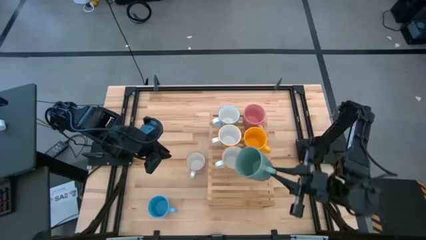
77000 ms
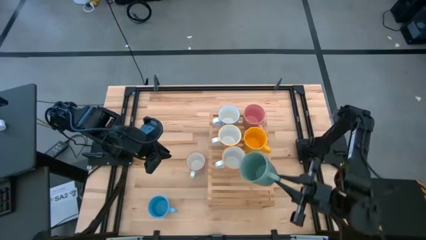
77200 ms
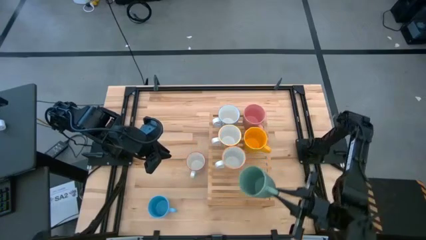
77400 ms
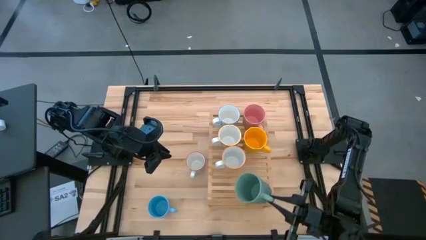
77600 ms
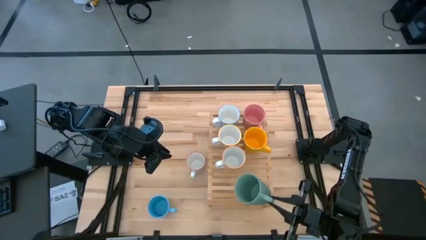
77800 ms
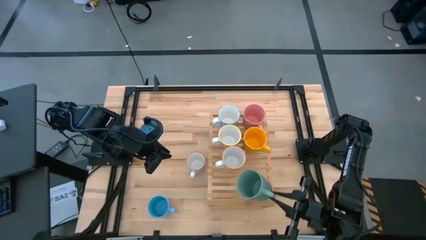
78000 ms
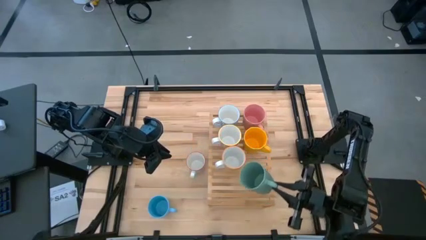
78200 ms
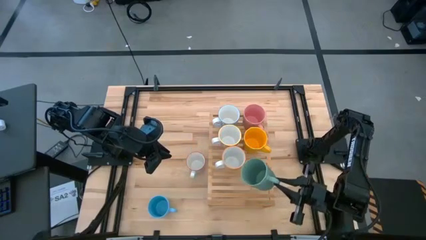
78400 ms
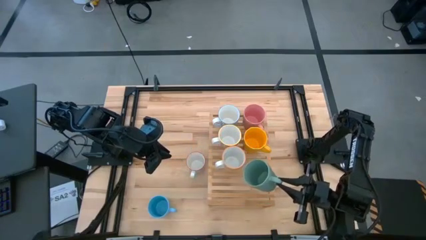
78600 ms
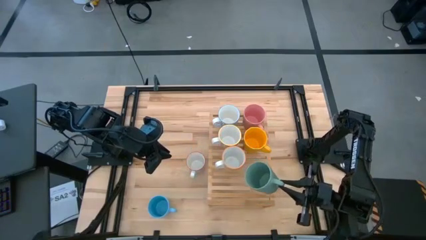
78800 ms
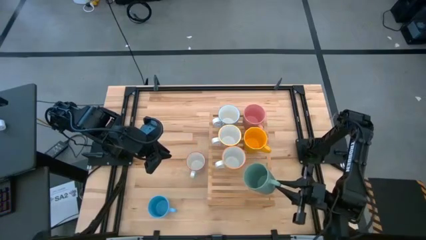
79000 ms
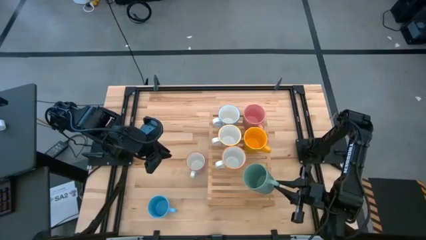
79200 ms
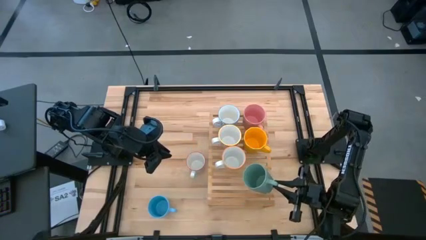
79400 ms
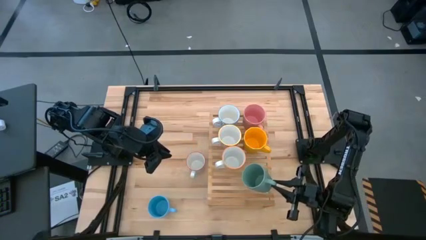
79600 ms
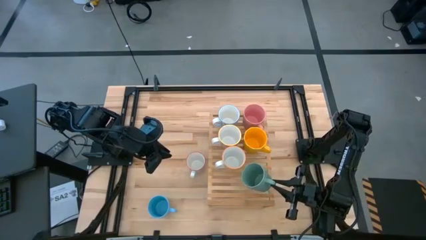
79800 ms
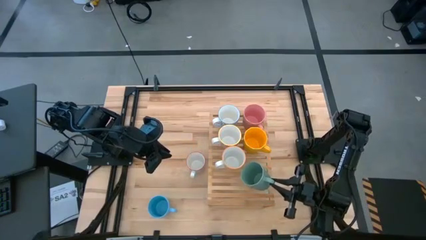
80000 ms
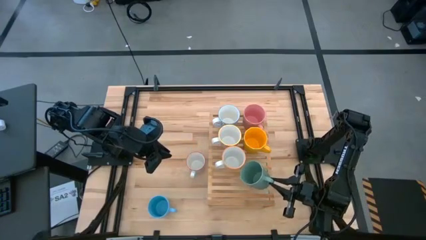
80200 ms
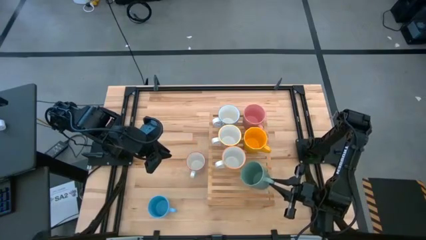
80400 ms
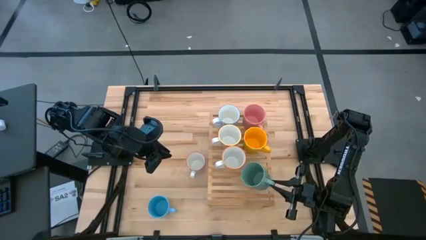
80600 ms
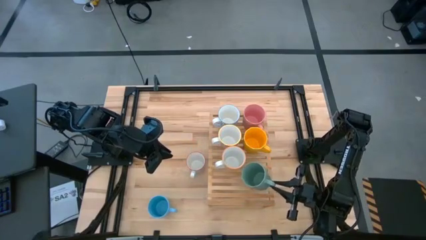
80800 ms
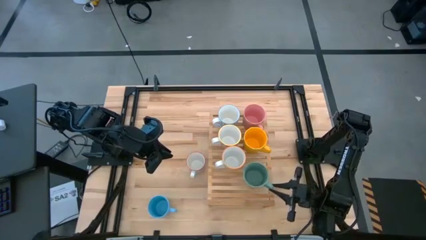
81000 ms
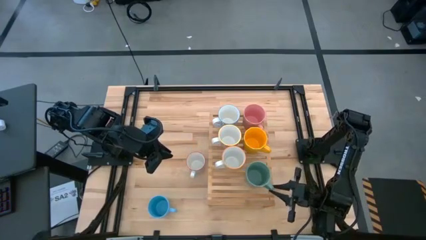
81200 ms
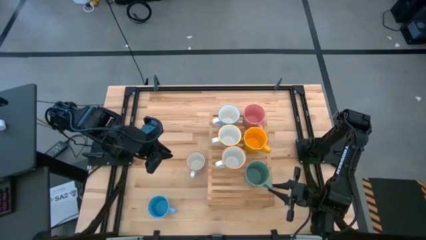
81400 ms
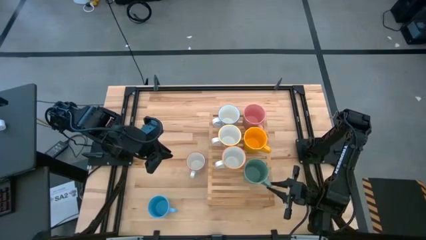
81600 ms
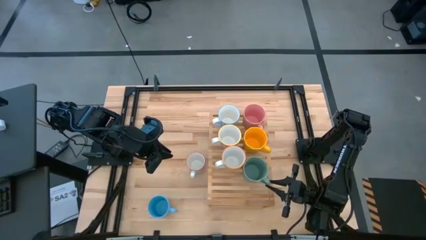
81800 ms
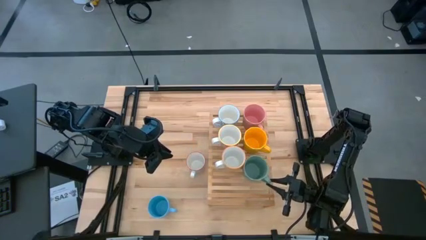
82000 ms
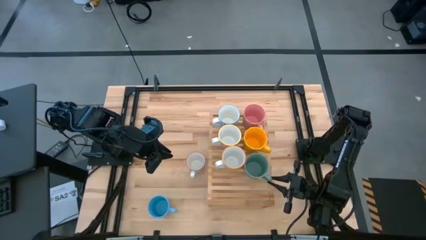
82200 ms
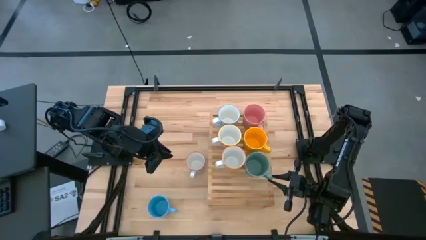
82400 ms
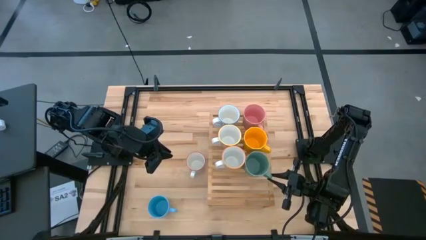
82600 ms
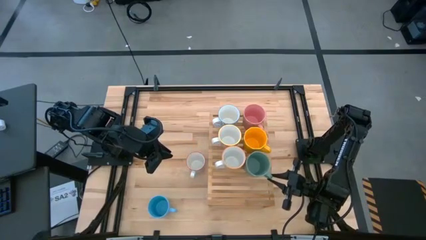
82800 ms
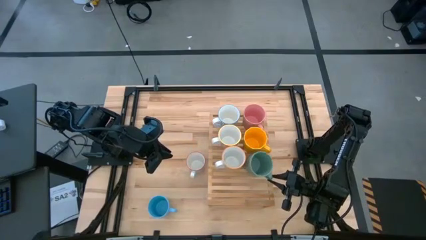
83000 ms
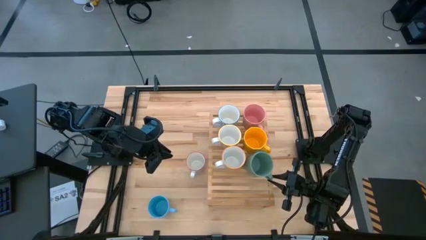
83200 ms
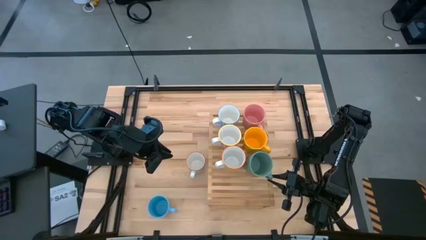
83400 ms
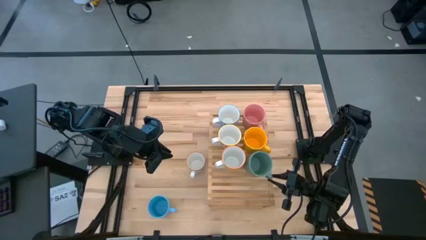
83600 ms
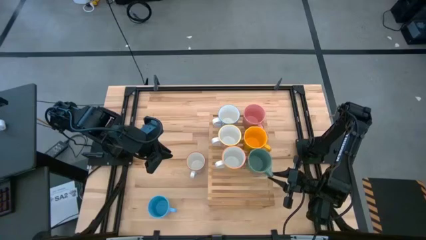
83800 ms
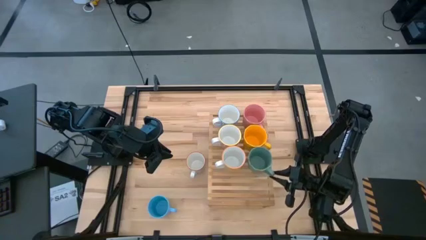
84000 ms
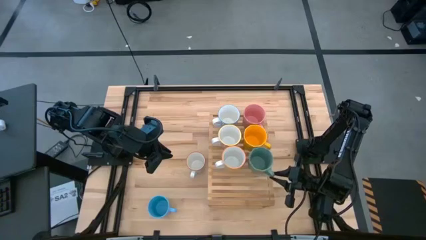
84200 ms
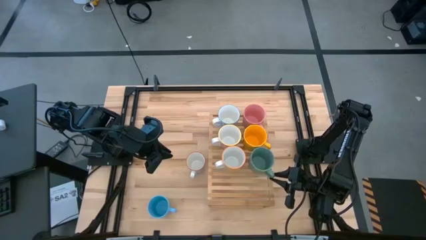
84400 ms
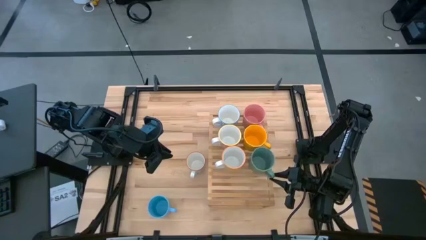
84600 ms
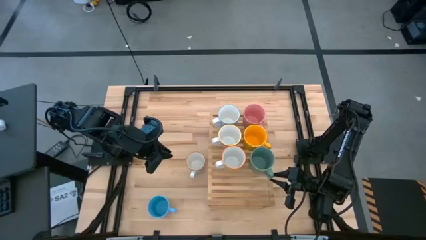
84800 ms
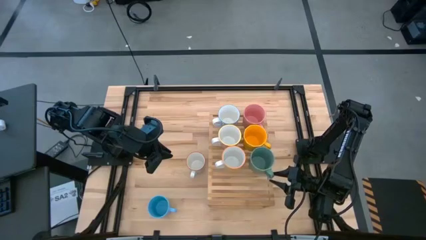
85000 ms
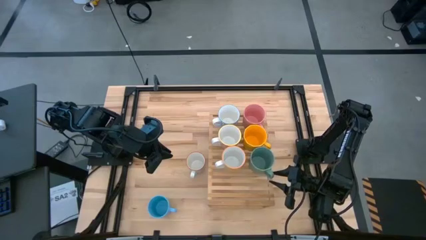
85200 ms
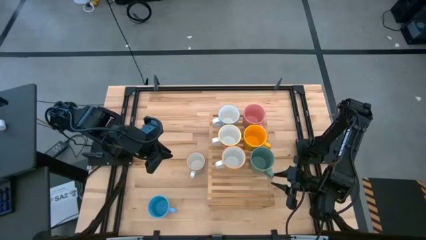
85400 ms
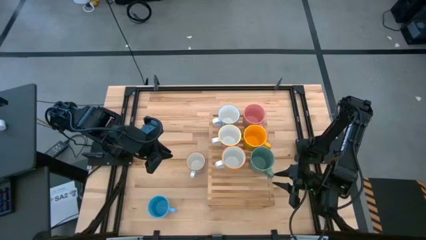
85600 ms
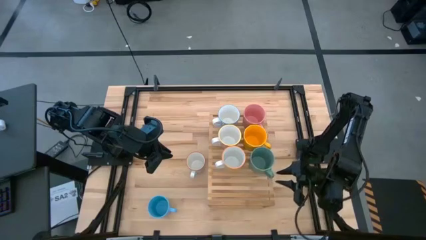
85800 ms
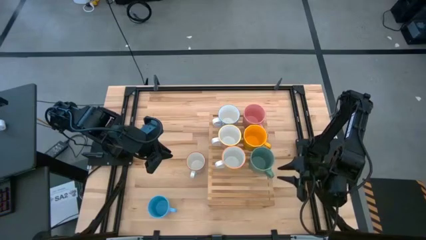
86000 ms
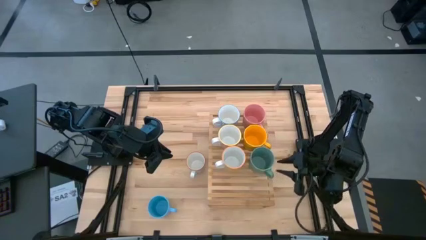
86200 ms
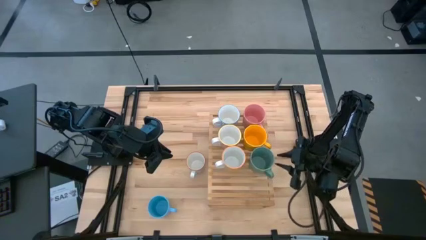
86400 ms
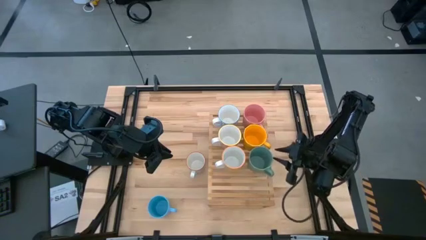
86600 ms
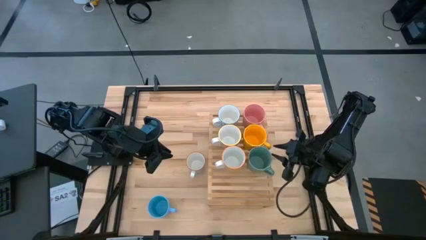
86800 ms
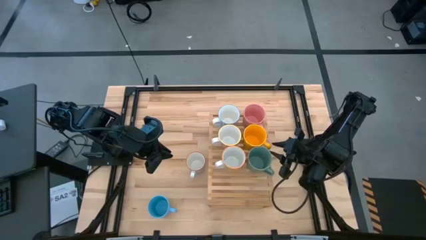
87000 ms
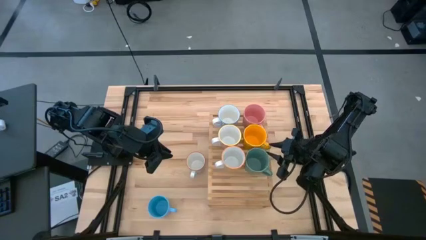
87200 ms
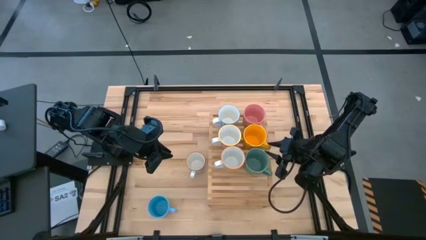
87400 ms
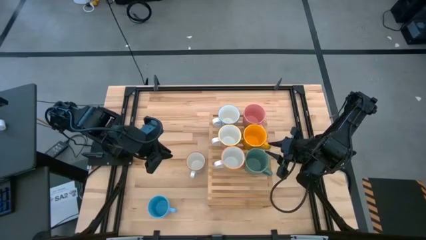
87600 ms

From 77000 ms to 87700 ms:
Task: Place coffee mugs
Put the green mug on the shelf
